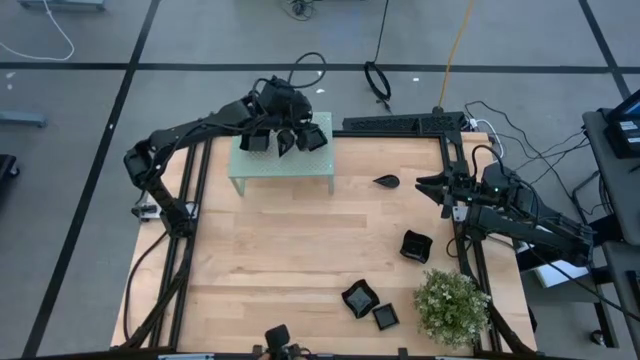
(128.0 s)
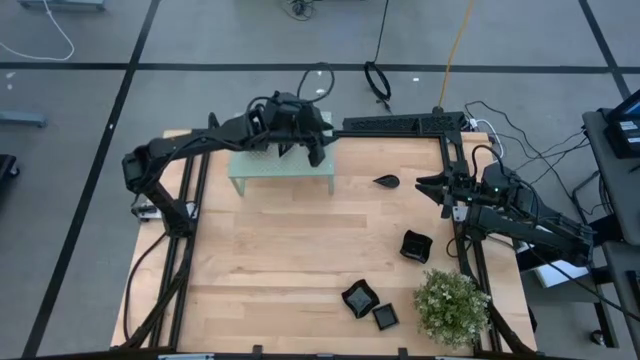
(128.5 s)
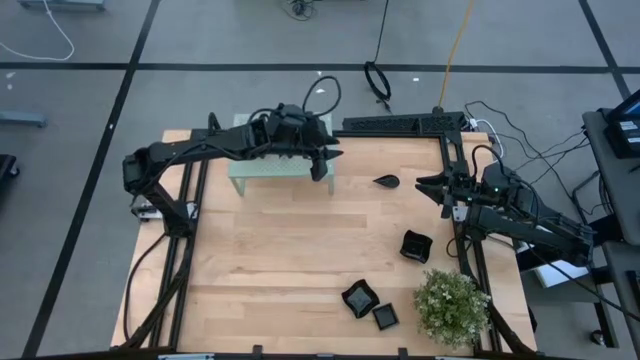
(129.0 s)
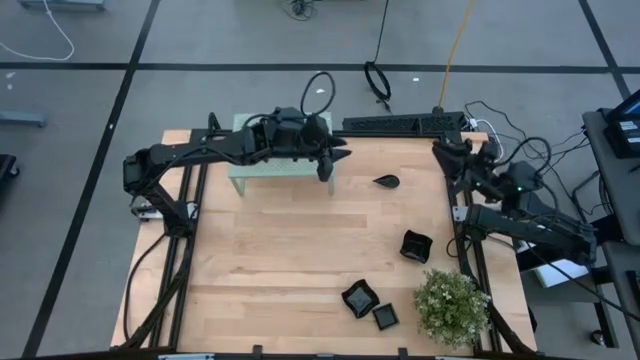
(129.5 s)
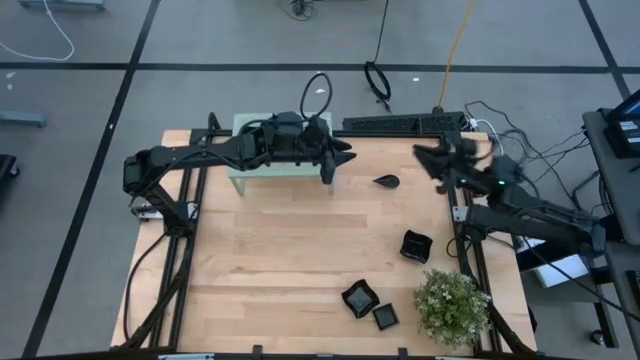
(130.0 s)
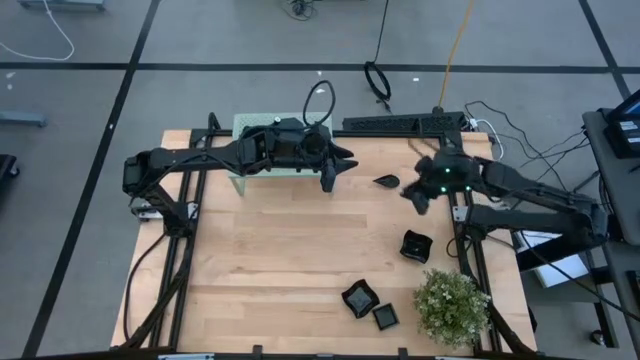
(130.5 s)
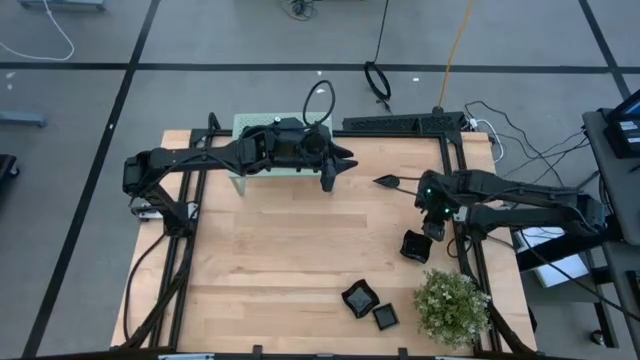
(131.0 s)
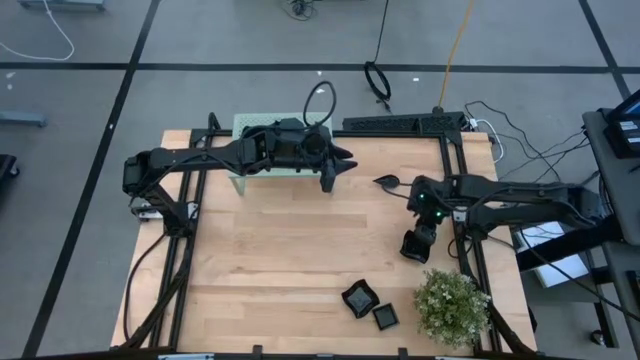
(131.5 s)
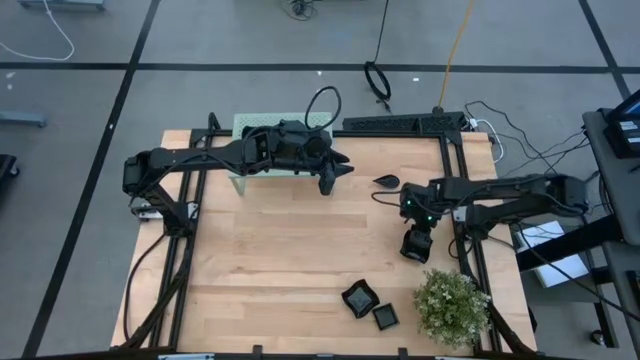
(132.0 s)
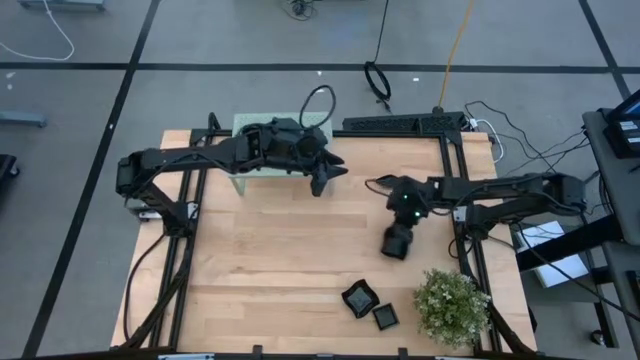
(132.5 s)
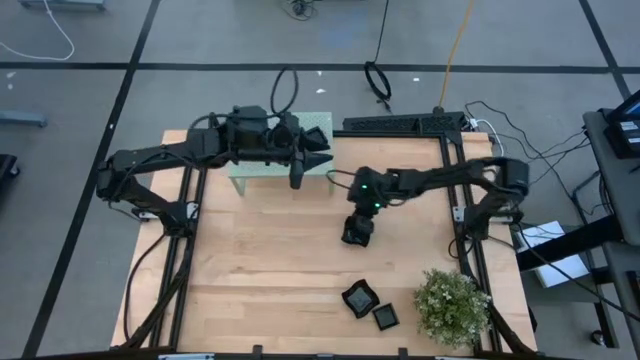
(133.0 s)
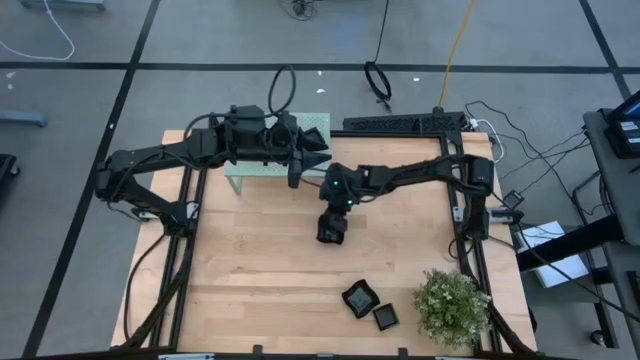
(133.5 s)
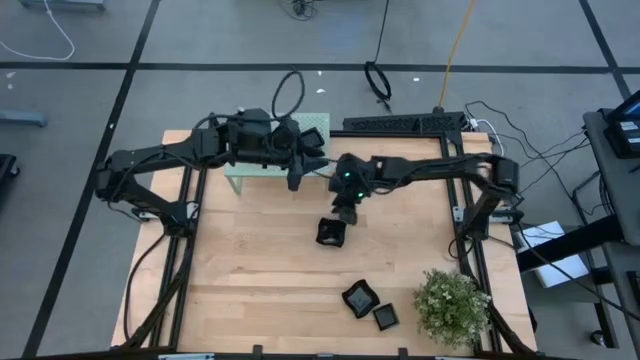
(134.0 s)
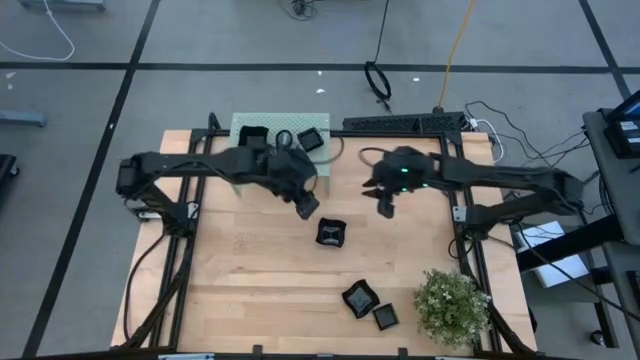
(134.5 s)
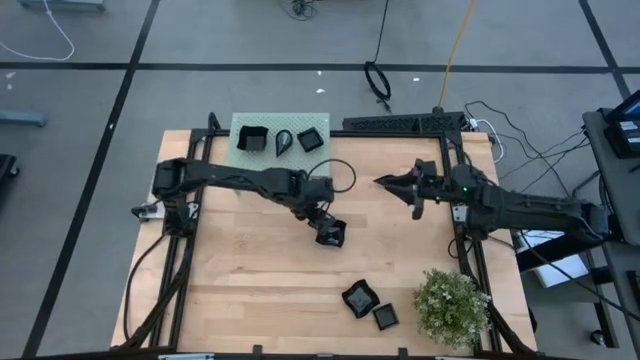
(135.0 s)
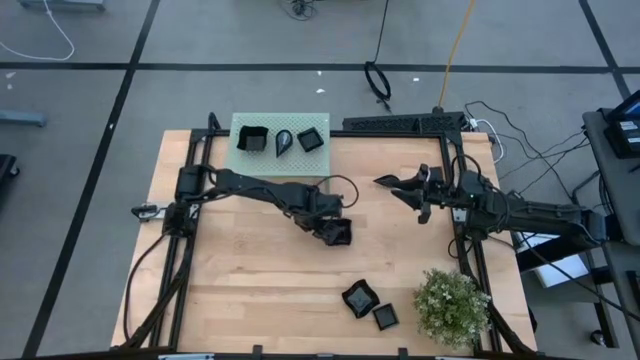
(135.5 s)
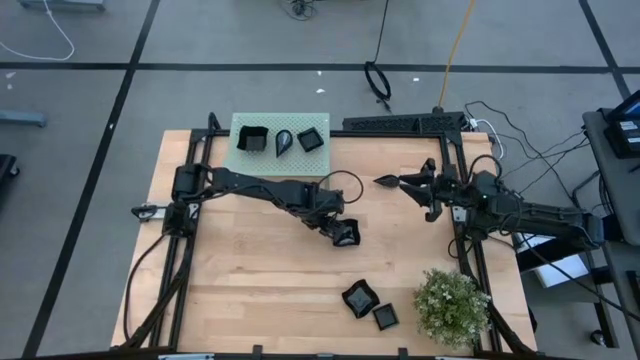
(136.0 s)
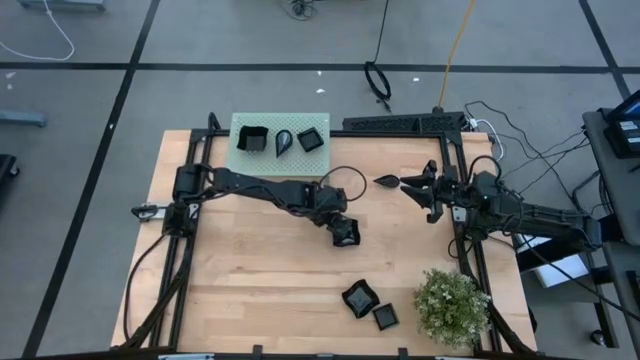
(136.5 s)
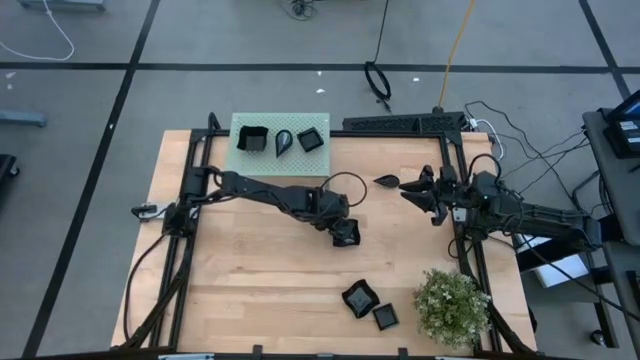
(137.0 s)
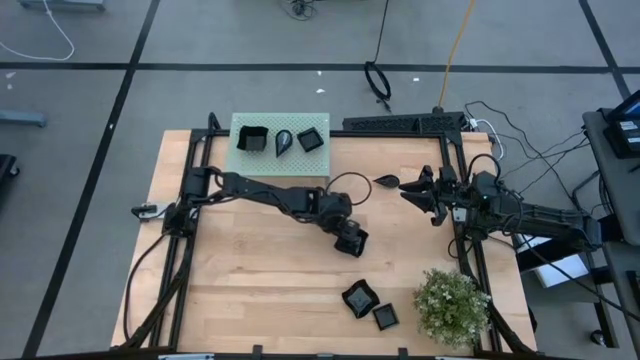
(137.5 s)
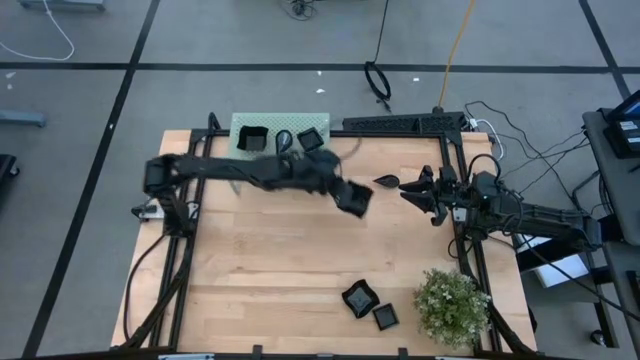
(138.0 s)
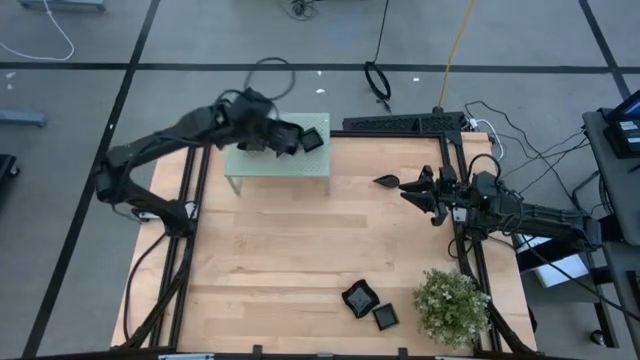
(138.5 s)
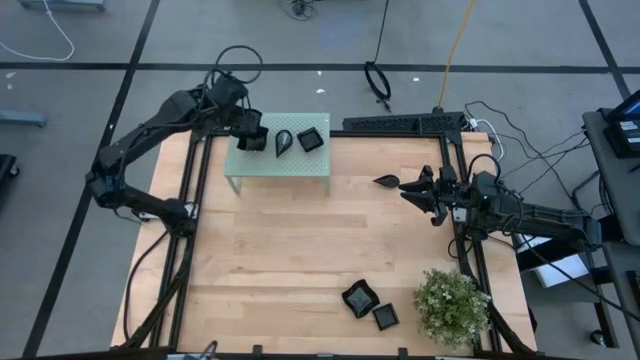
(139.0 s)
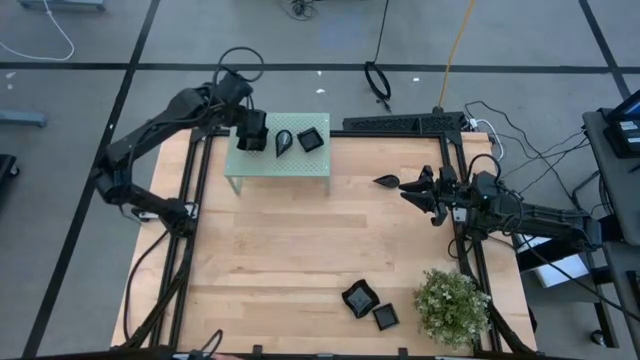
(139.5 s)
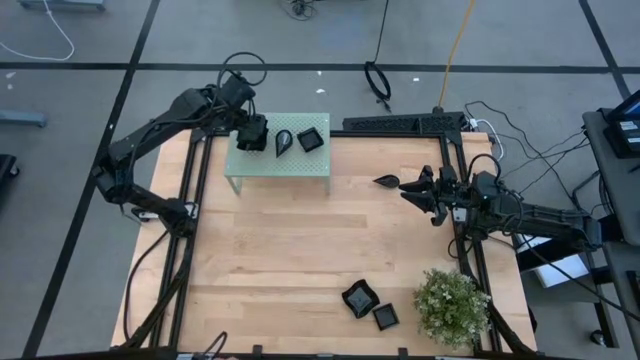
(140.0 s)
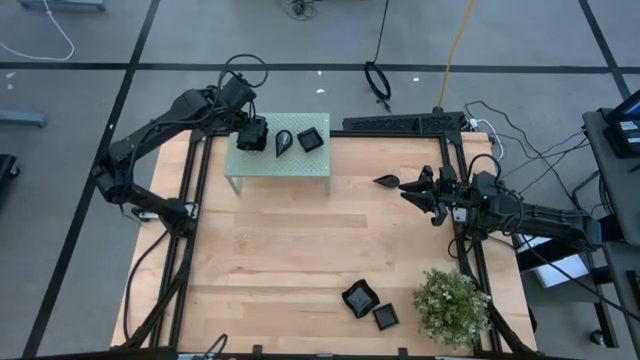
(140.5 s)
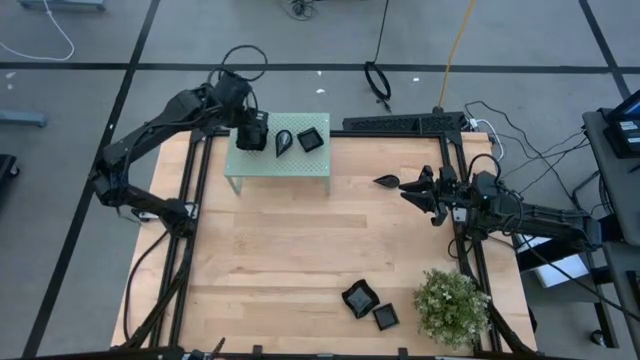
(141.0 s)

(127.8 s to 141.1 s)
Task: Pick & Place Mini shaped plates
Stack the distorted square plate on top of the stacked distorted square plates on the shelf

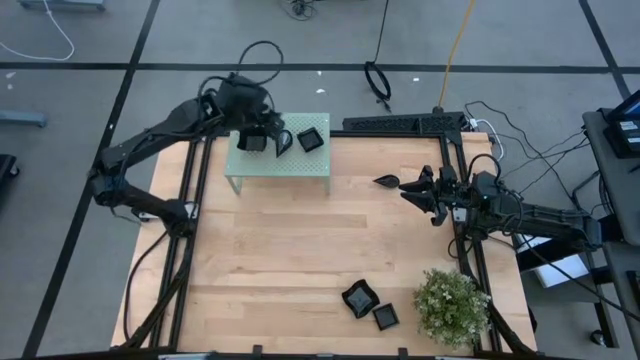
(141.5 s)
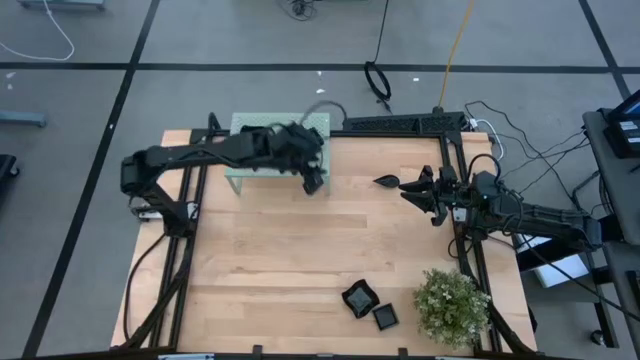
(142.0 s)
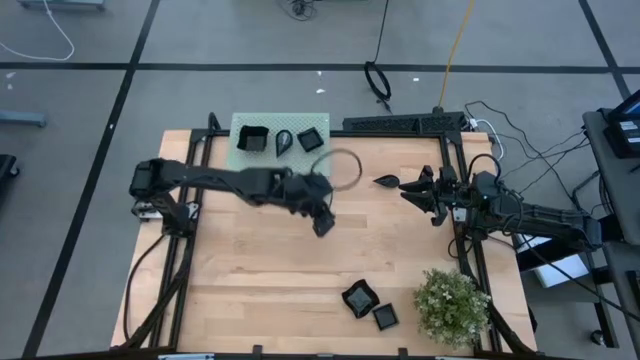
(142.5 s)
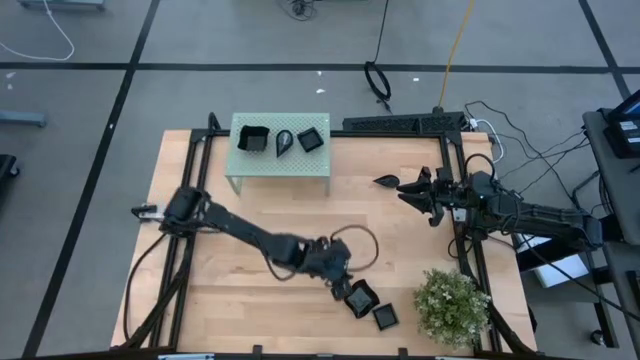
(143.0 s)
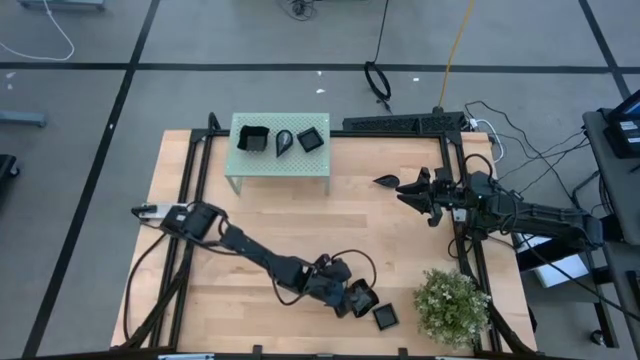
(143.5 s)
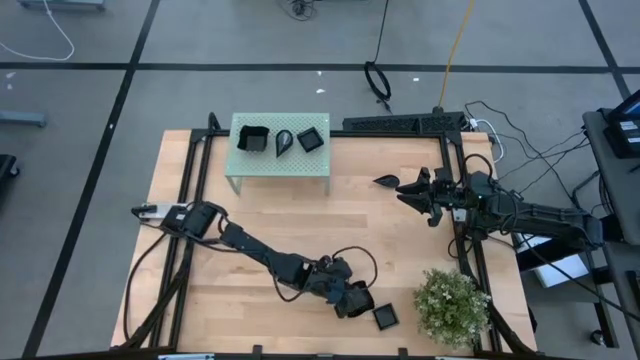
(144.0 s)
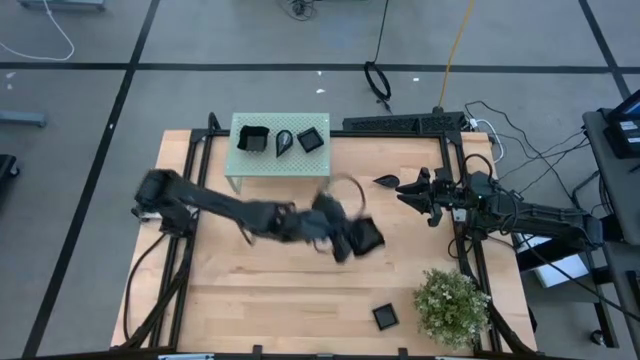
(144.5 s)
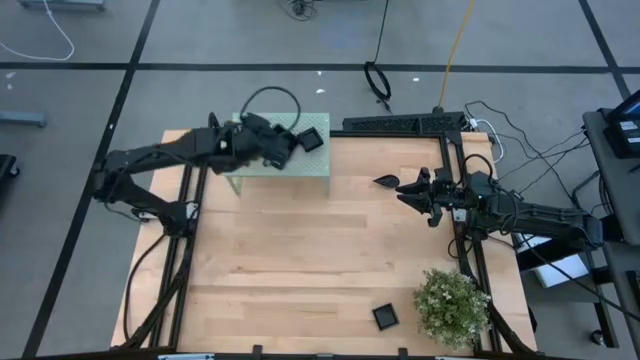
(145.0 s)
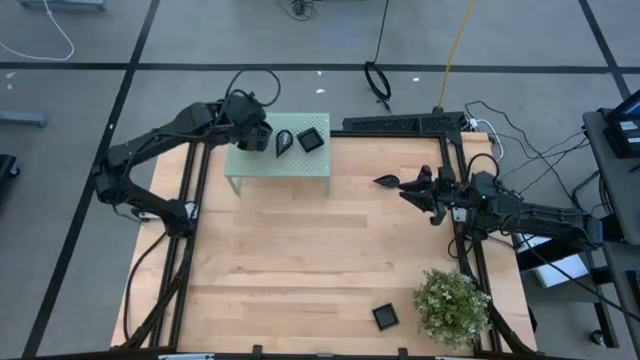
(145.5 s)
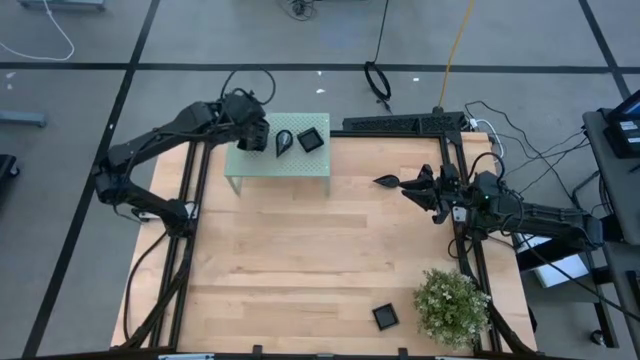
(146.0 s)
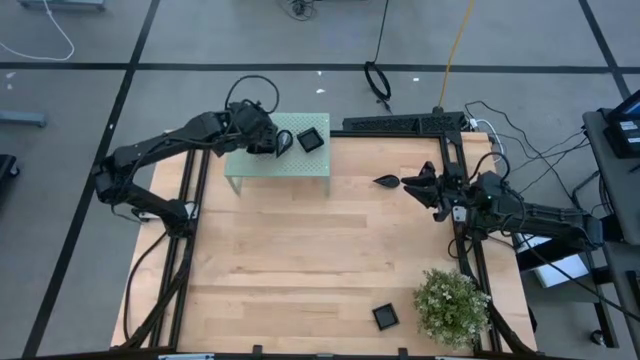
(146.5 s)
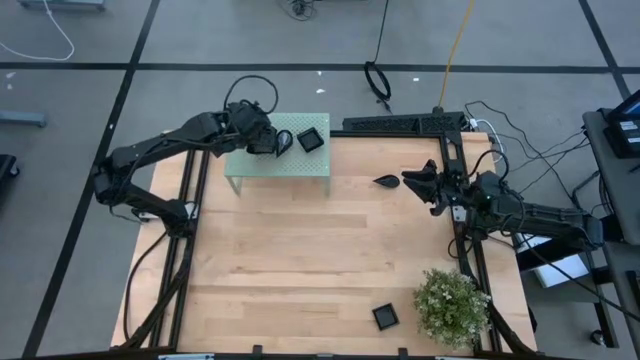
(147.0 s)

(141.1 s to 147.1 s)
Stack the distorted square plate on top of the stacked distorted square plates on the shelf

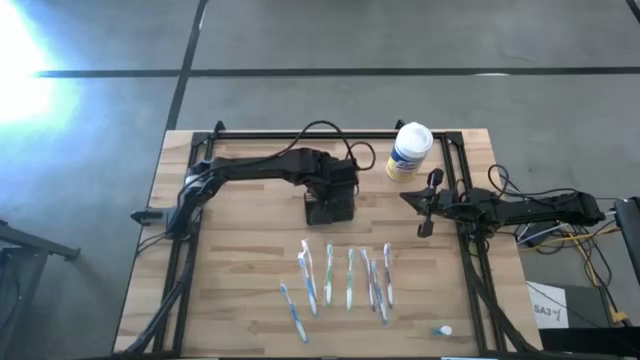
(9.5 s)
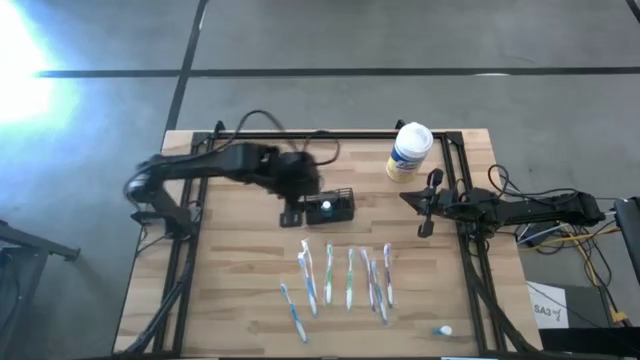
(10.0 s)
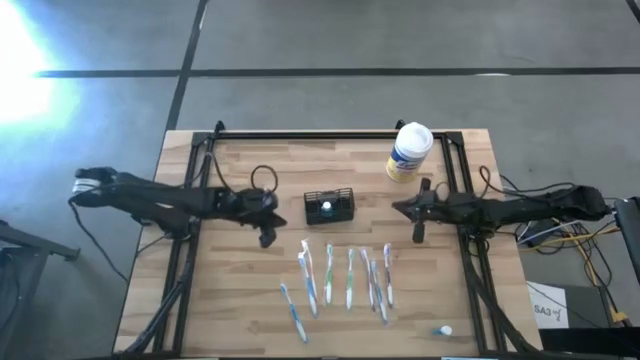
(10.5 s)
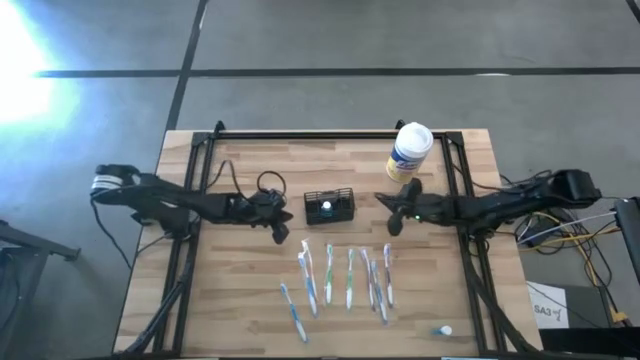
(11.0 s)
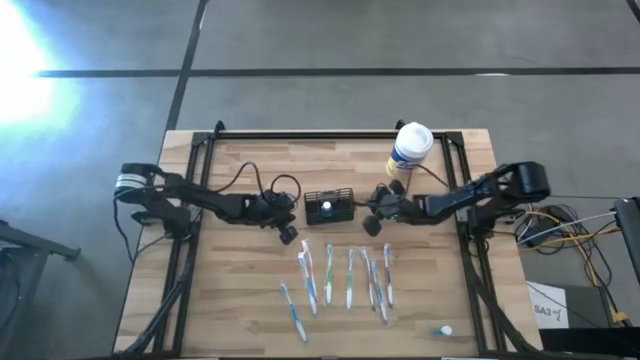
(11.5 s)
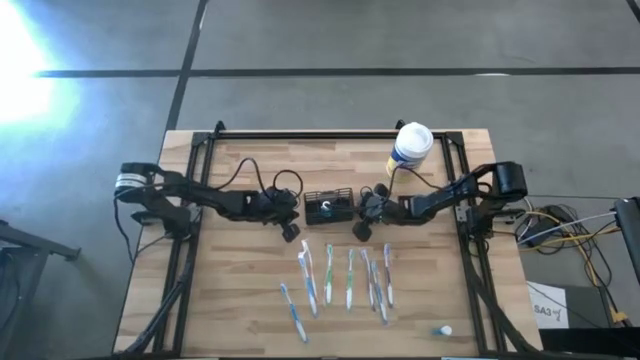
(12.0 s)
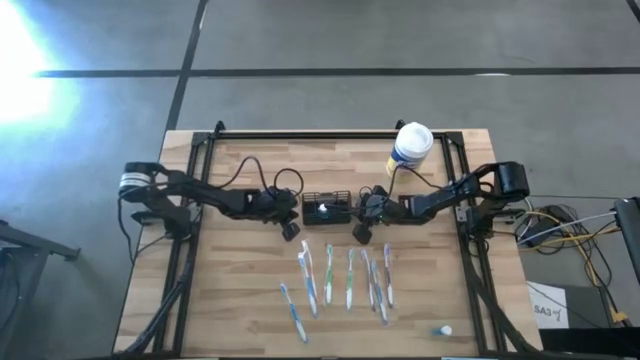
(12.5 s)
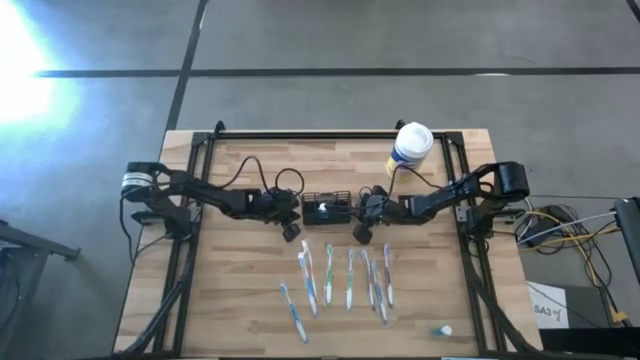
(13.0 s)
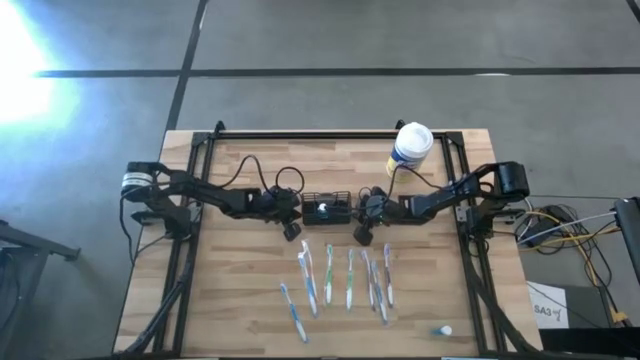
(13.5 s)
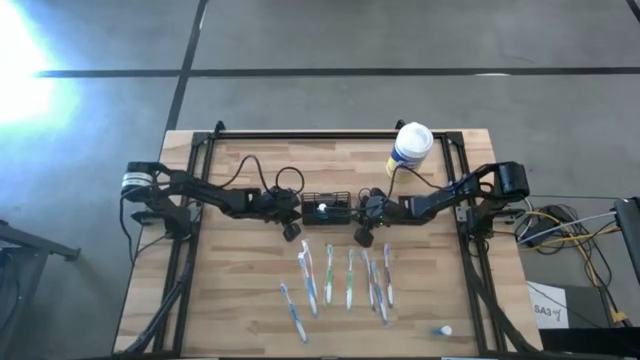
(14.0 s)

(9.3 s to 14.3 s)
Task: Pick & Place toothbrushing station
Adjust the black wire organizer
